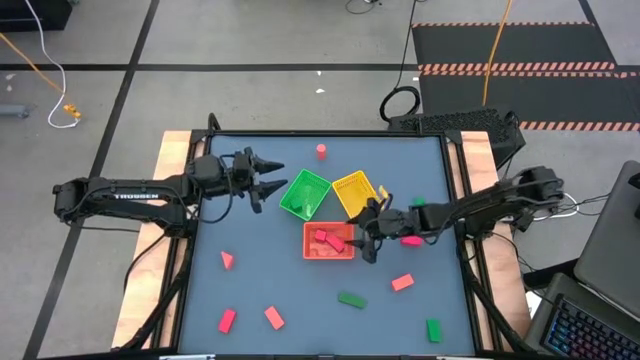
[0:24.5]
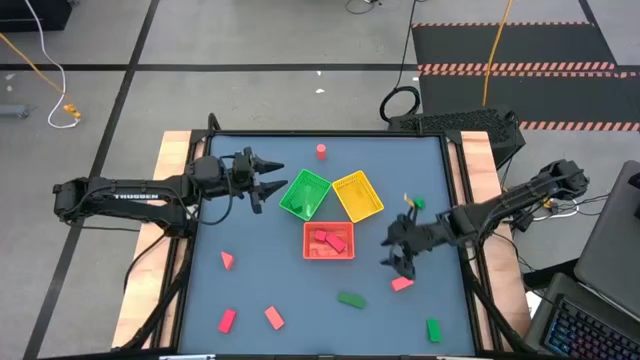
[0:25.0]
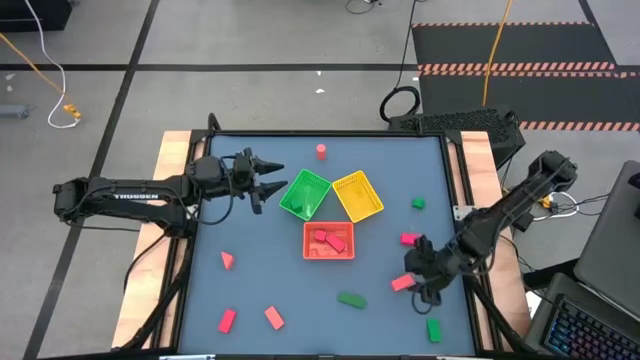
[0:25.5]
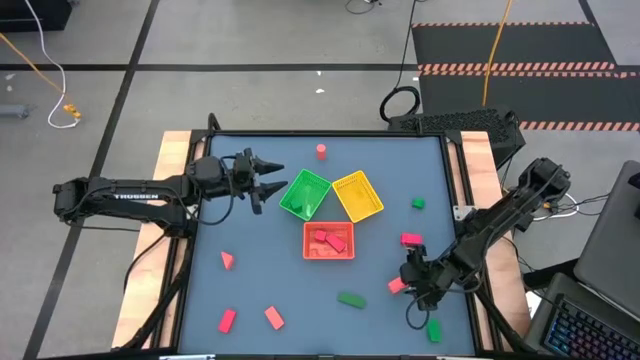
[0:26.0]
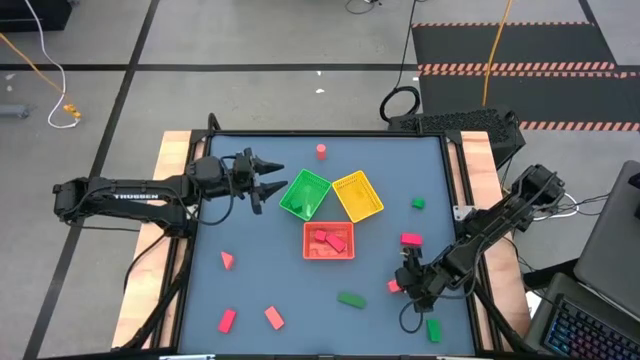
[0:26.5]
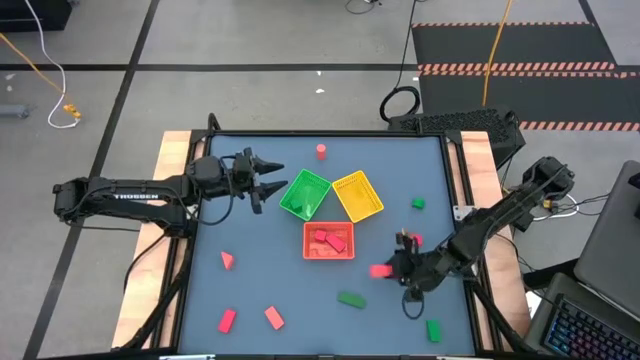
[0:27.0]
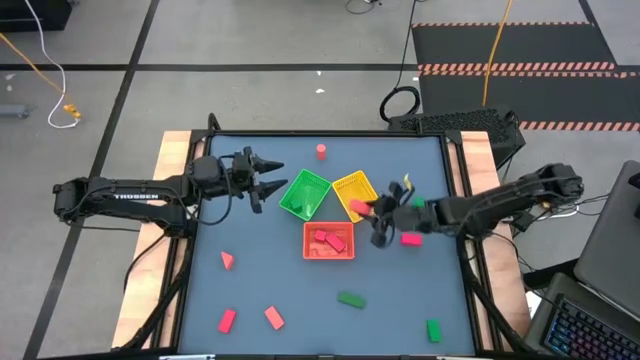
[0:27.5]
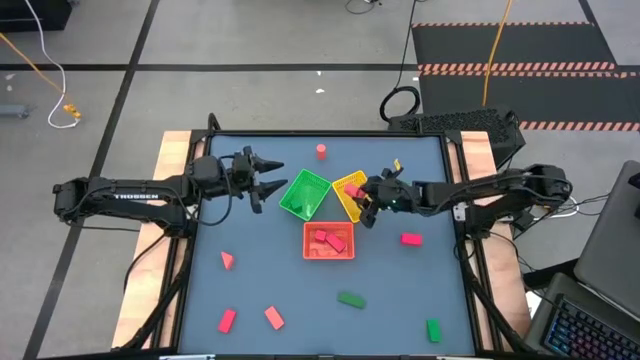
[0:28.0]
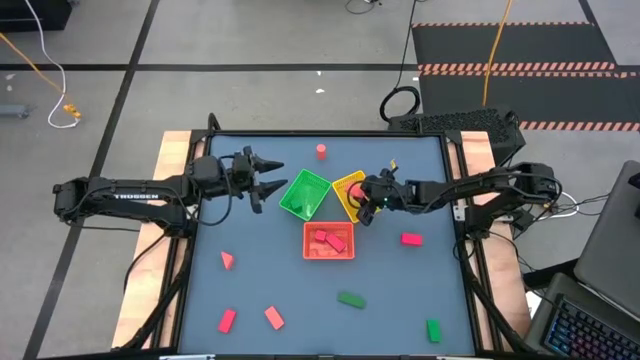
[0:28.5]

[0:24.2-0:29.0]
Task: Sort & place blocks by color
Put the orange block into the yellow bin

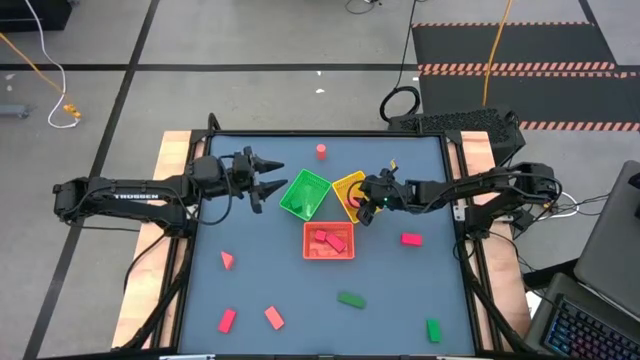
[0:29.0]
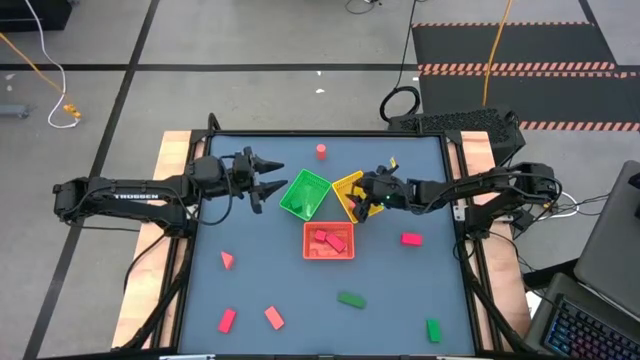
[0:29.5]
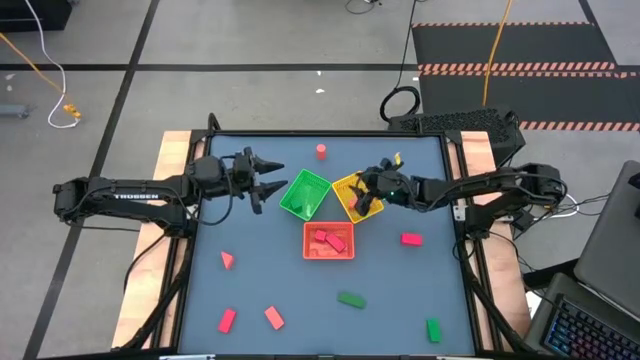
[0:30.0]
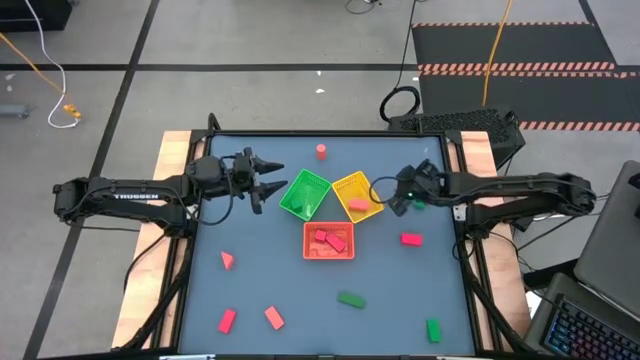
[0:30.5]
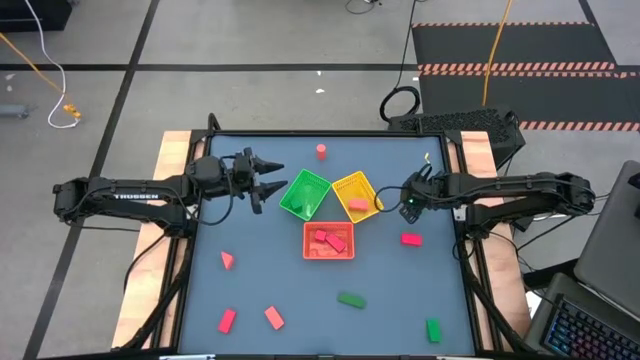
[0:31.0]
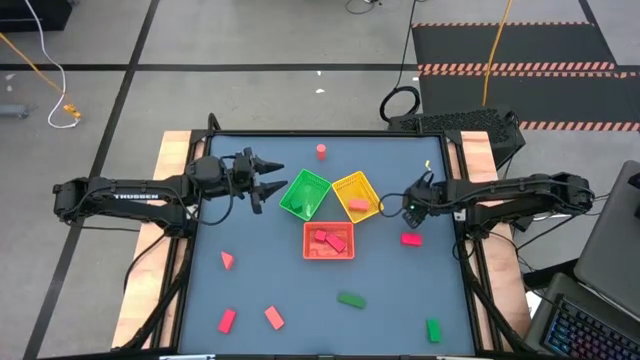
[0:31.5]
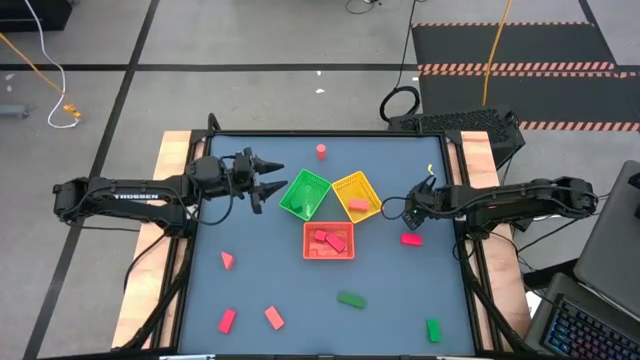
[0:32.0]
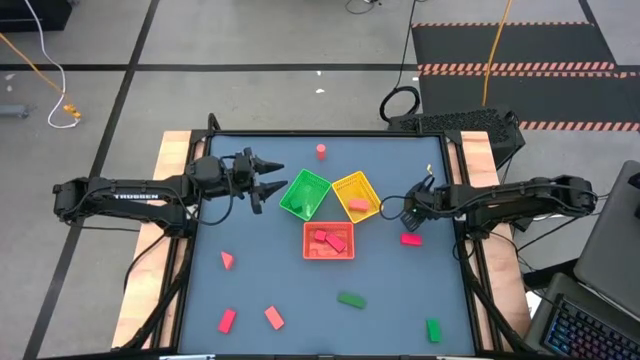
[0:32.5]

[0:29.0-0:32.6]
Put the green block into the green bin

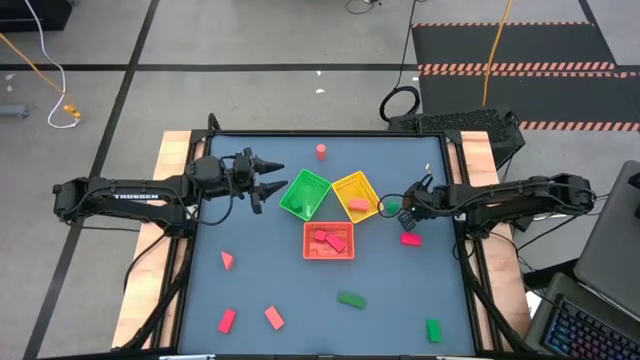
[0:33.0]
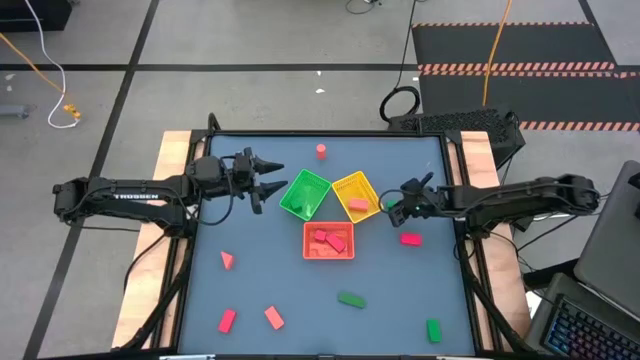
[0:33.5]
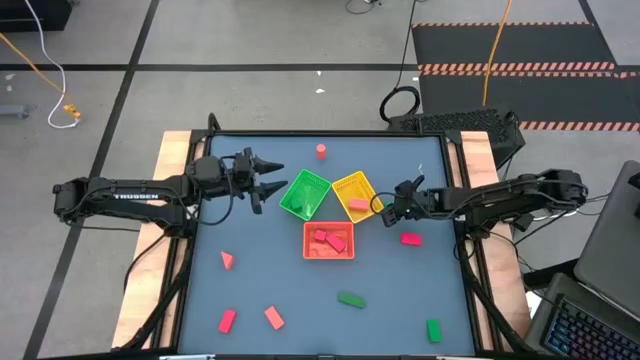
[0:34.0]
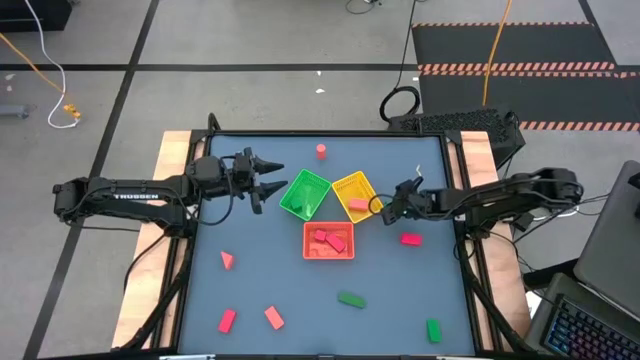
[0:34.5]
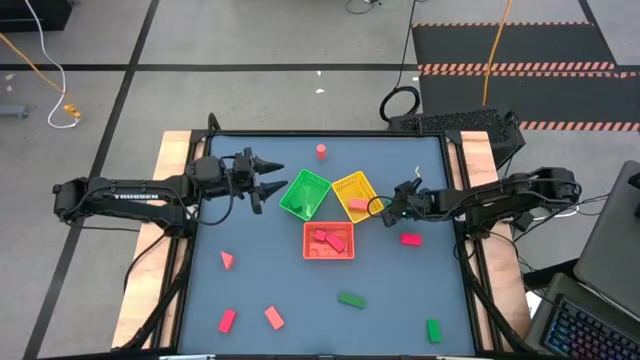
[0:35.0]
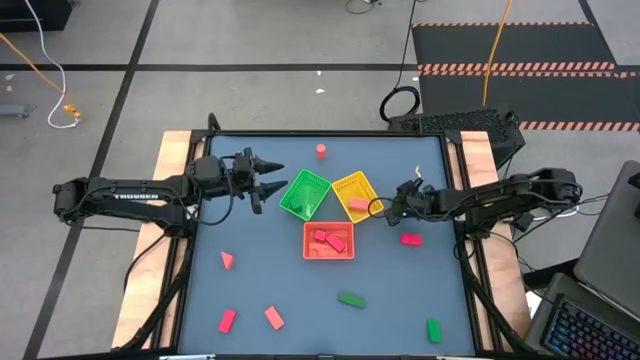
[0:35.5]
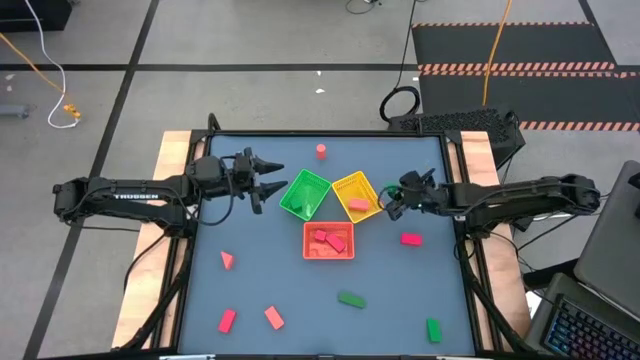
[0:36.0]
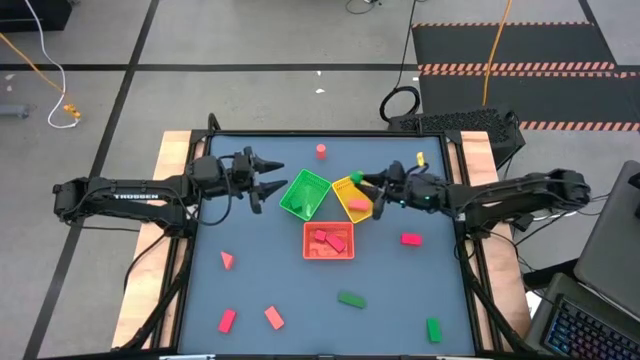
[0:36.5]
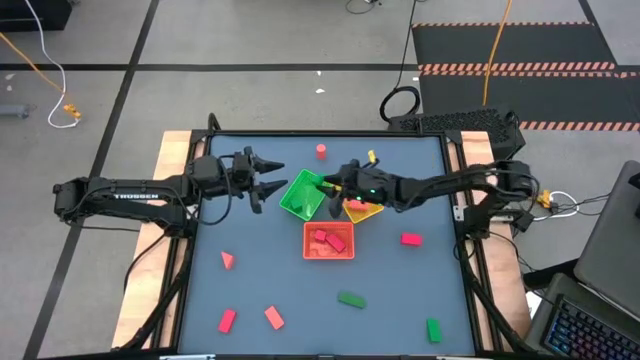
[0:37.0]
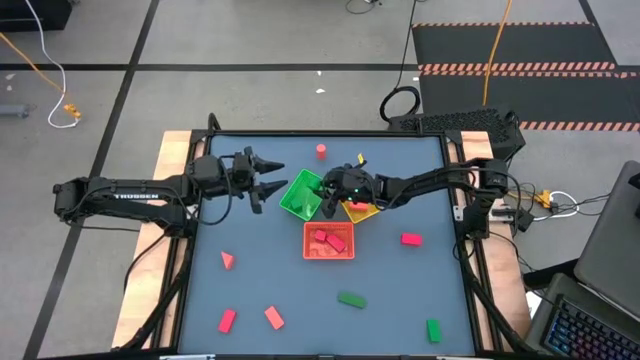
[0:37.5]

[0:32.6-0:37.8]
Put the green block into the green bin

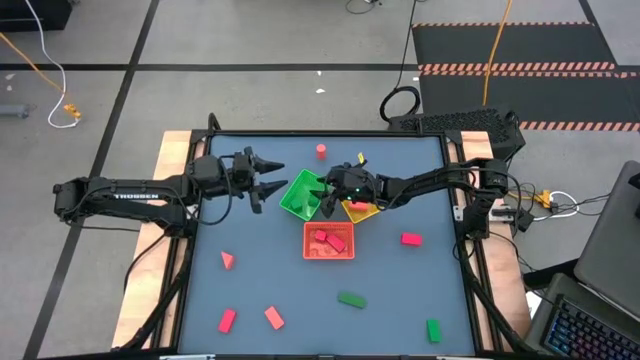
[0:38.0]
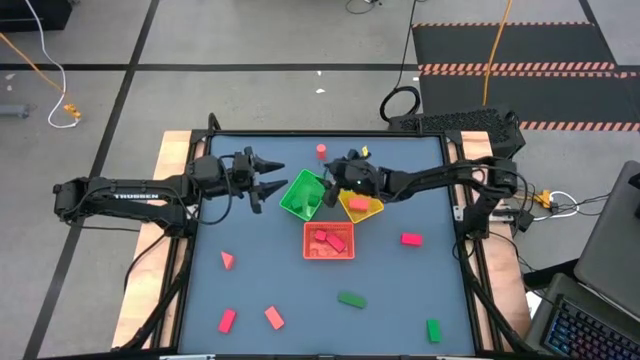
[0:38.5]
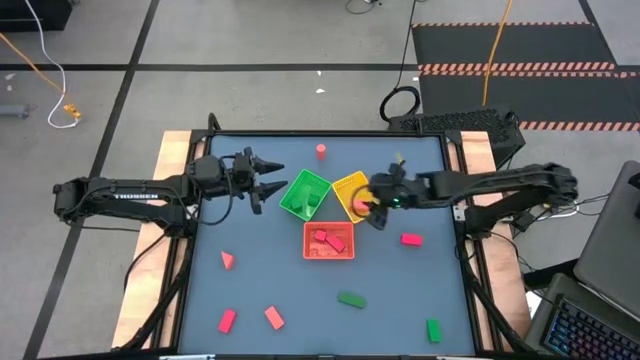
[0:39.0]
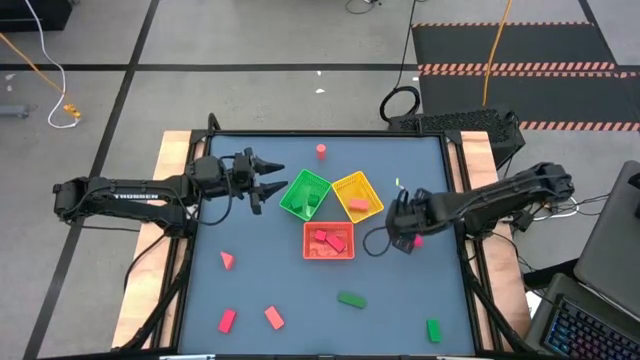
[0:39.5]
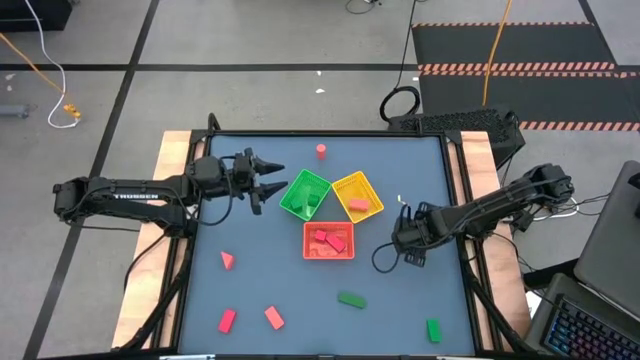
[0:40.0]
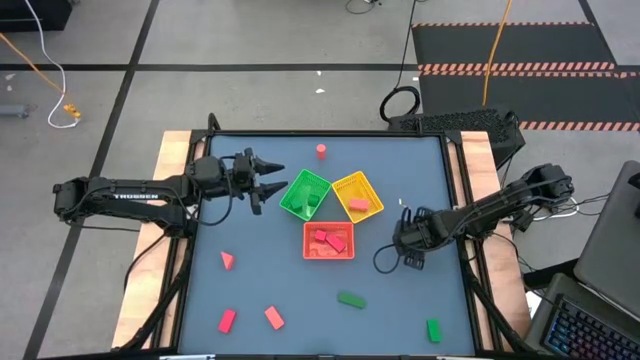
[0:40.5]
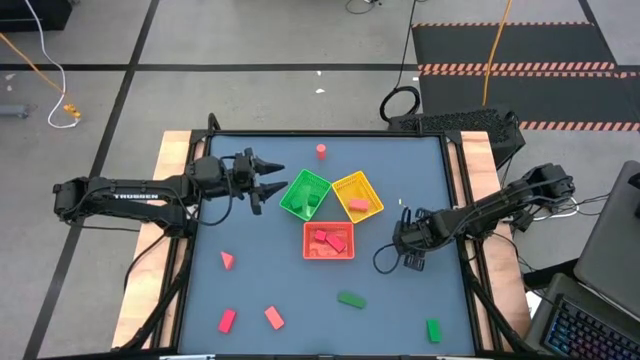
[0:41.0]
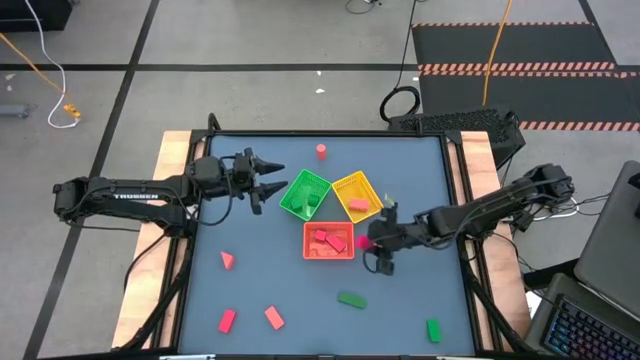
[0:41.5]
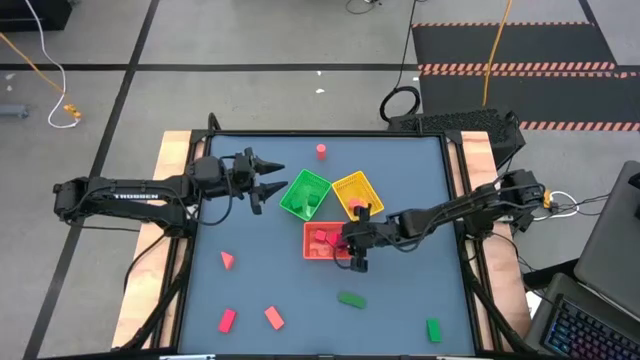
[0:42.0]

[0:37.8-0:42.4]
Put the red block into the orange bin

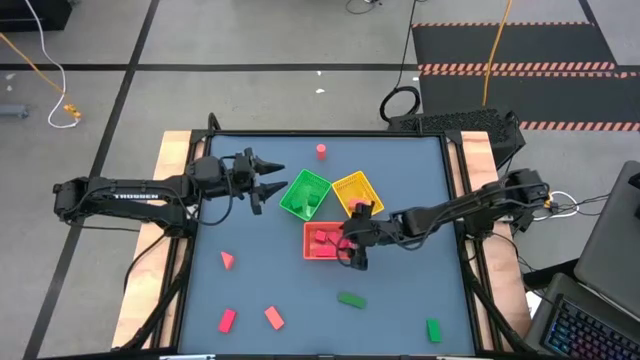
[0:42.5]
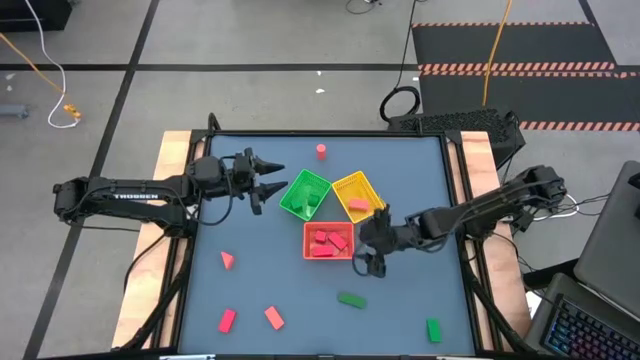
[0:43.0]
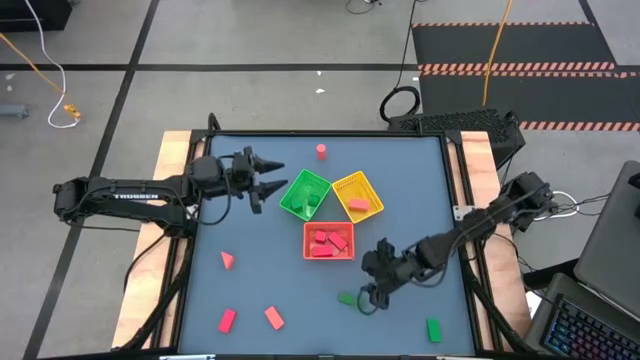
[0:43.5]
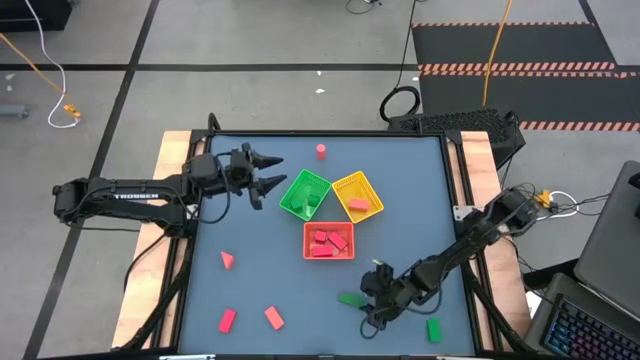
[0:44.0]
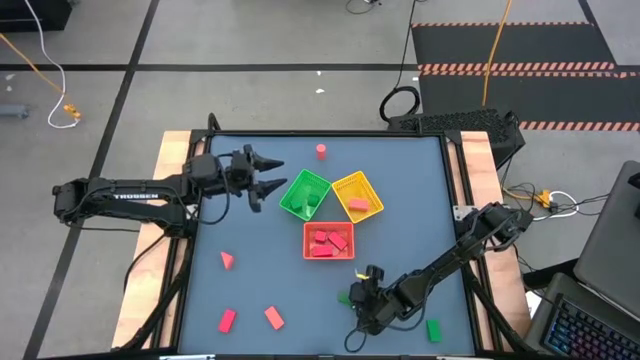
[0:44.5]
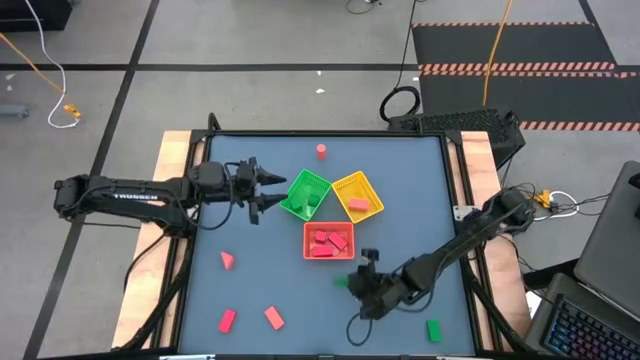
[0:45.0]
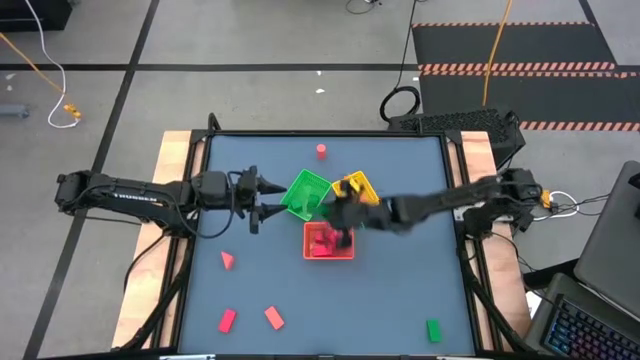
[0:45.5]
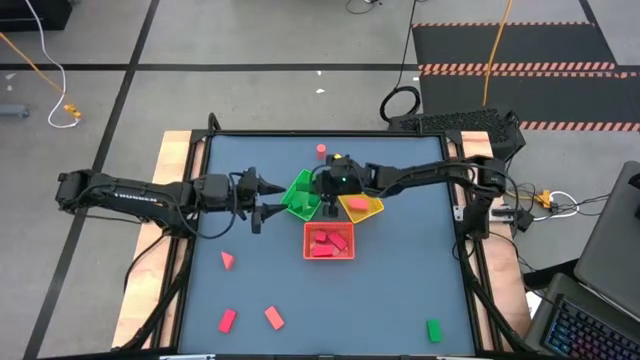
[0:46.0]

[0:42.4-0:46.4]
Put the green block into the green bin
